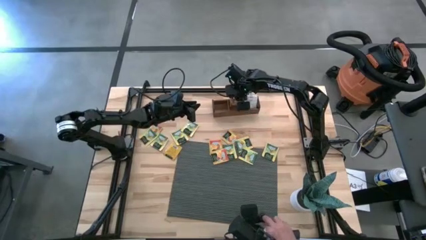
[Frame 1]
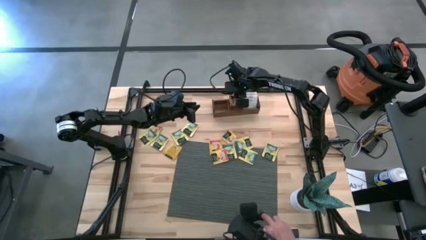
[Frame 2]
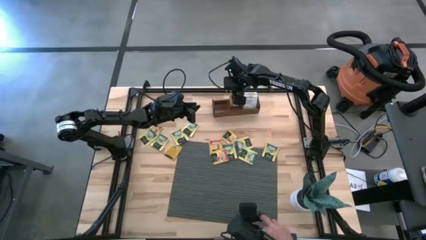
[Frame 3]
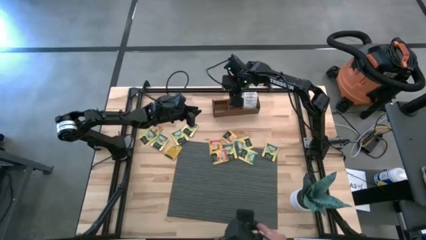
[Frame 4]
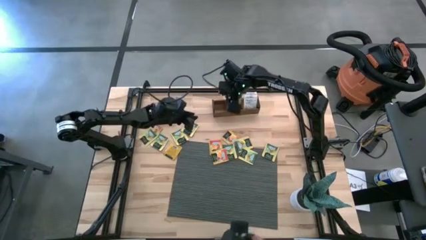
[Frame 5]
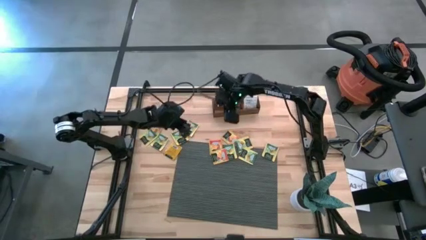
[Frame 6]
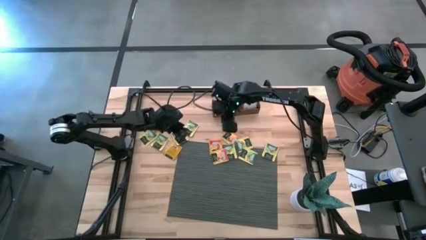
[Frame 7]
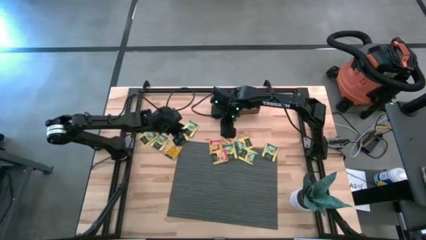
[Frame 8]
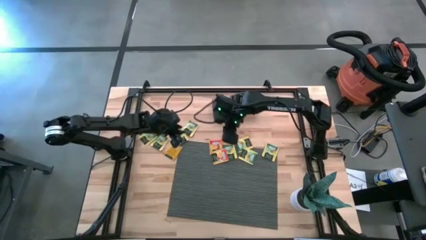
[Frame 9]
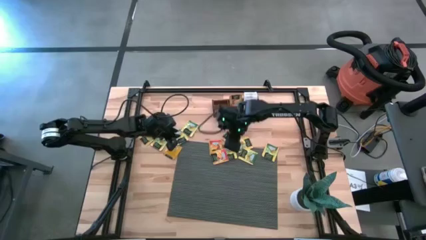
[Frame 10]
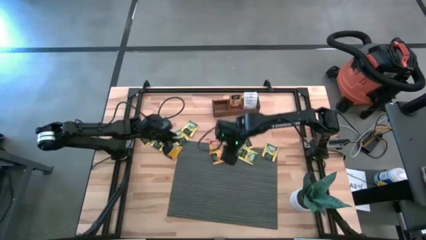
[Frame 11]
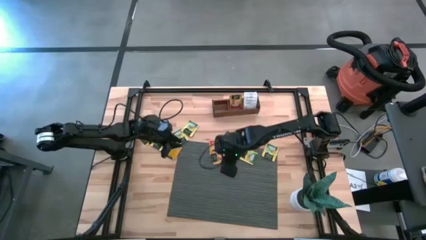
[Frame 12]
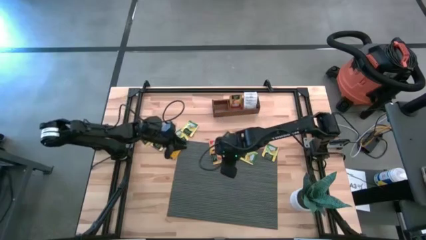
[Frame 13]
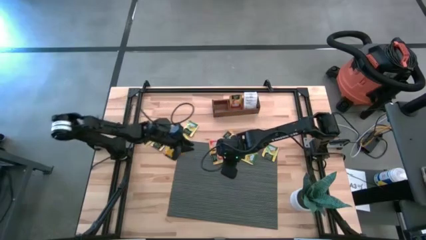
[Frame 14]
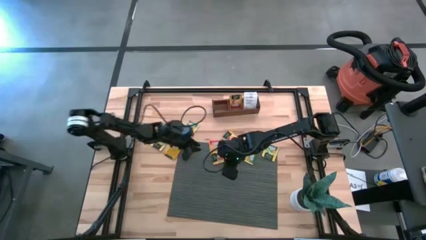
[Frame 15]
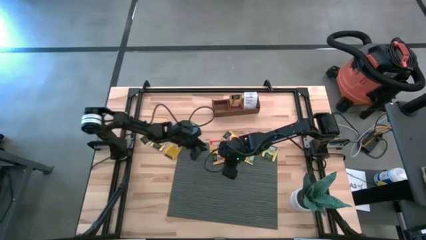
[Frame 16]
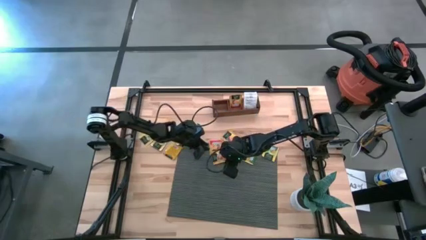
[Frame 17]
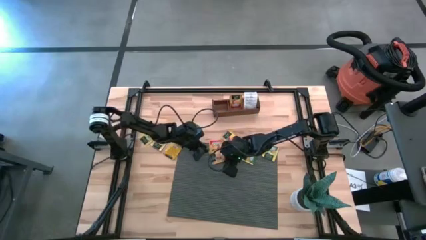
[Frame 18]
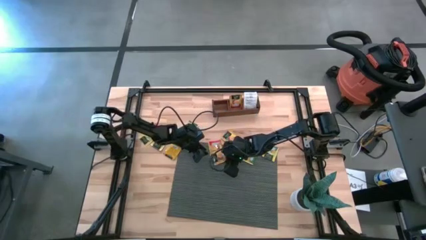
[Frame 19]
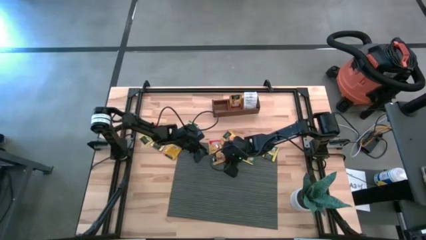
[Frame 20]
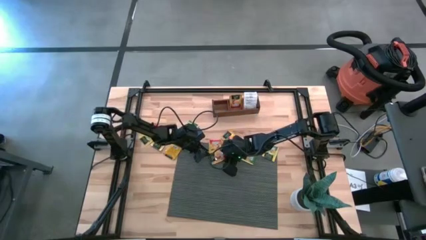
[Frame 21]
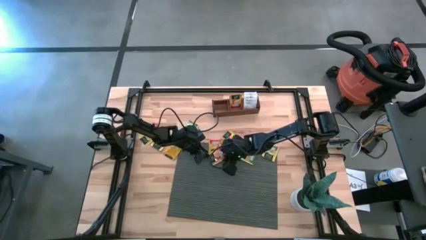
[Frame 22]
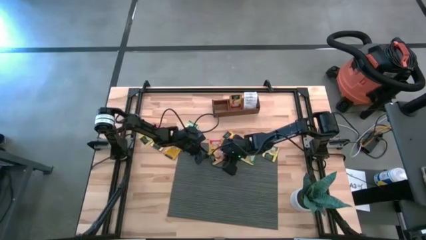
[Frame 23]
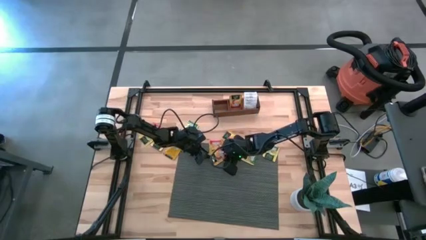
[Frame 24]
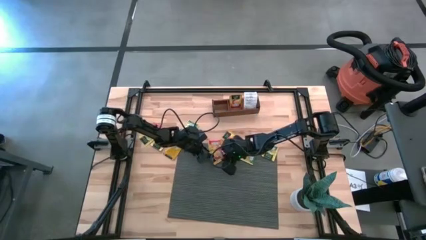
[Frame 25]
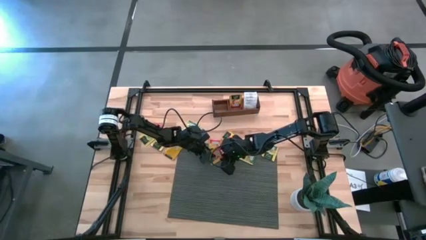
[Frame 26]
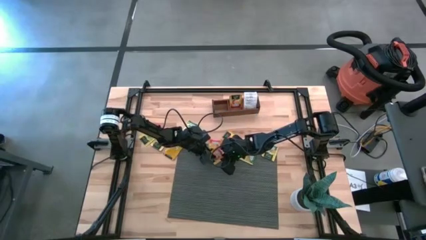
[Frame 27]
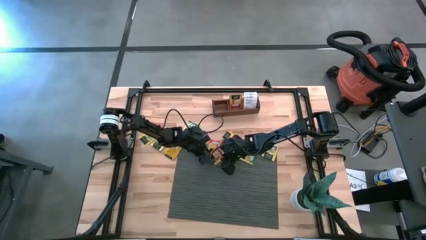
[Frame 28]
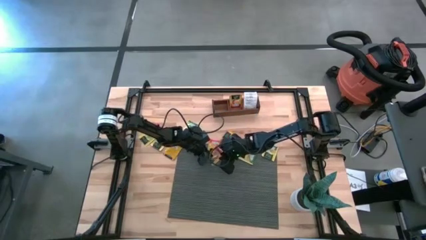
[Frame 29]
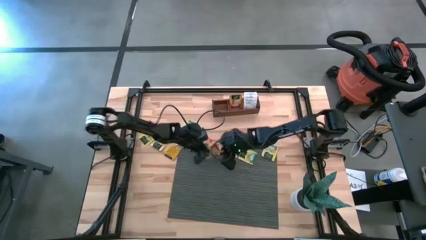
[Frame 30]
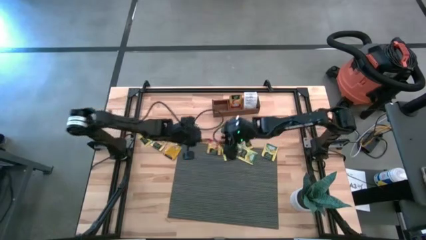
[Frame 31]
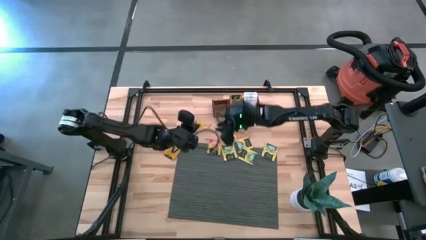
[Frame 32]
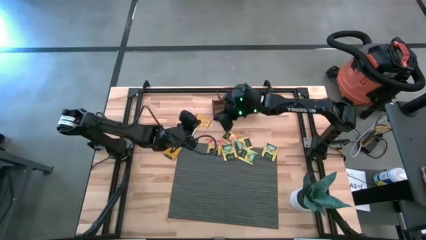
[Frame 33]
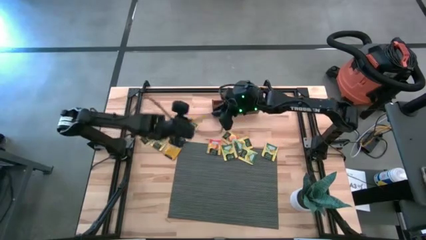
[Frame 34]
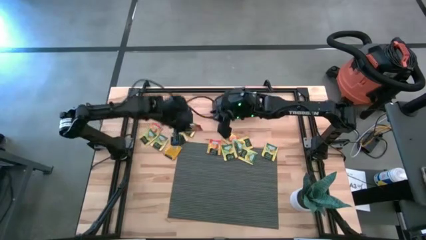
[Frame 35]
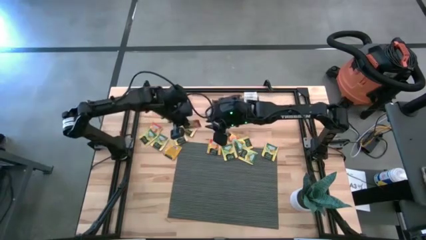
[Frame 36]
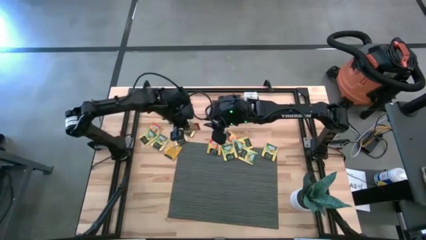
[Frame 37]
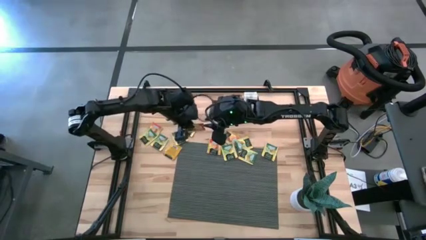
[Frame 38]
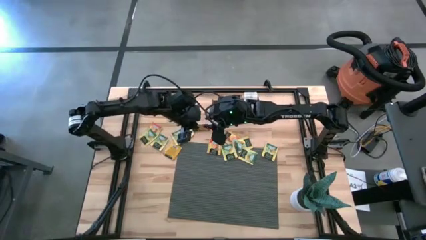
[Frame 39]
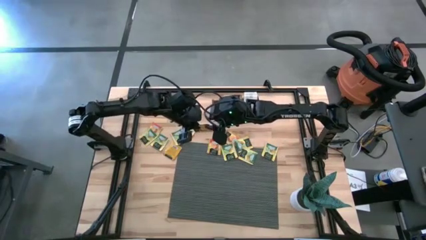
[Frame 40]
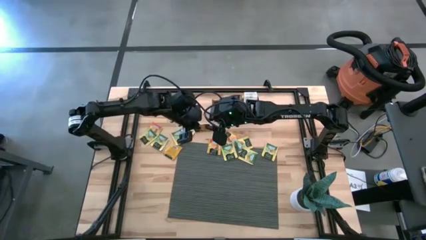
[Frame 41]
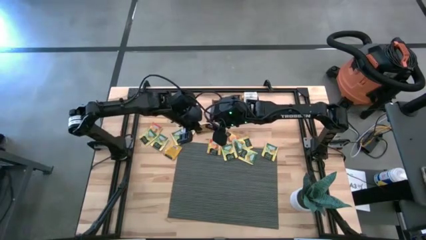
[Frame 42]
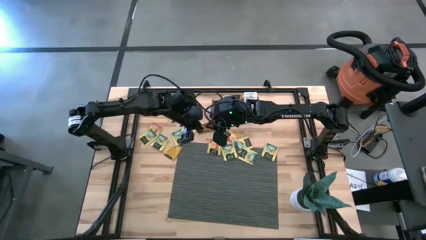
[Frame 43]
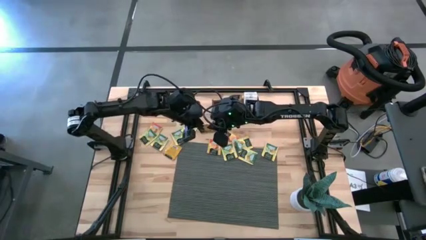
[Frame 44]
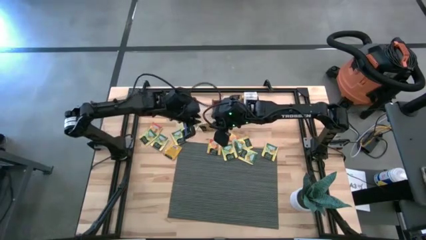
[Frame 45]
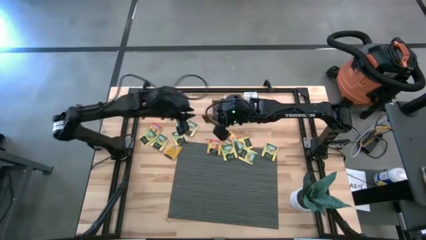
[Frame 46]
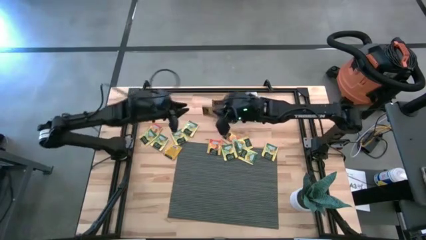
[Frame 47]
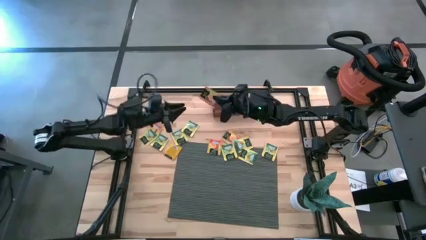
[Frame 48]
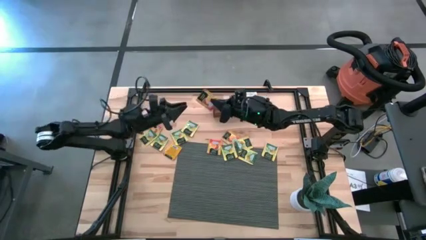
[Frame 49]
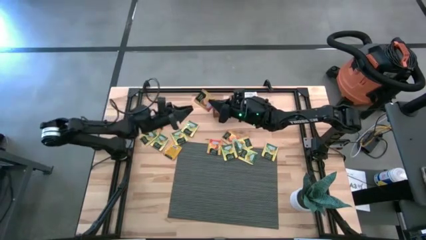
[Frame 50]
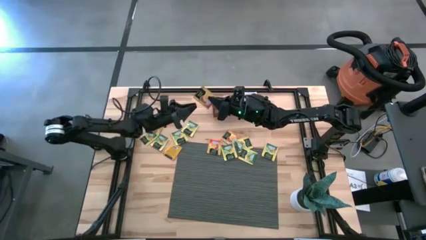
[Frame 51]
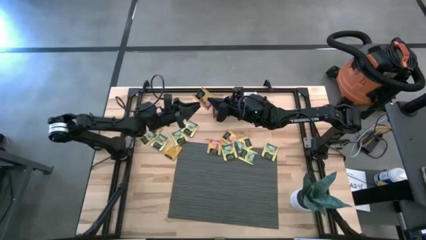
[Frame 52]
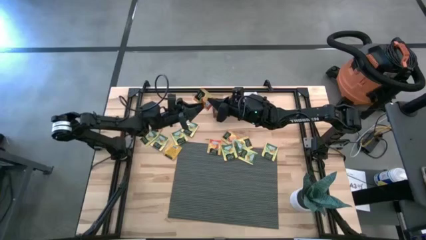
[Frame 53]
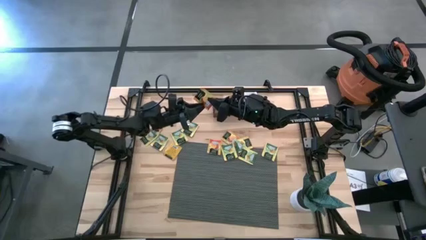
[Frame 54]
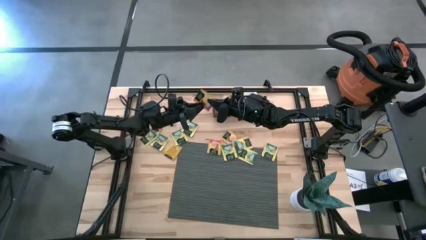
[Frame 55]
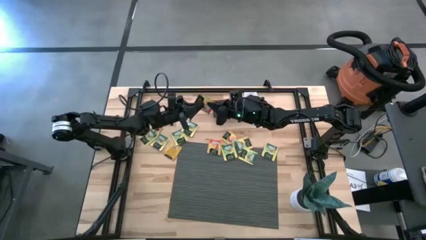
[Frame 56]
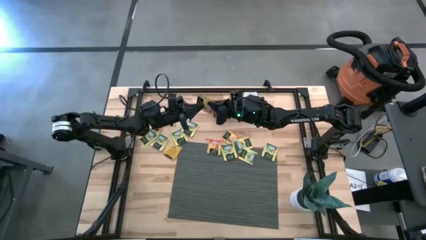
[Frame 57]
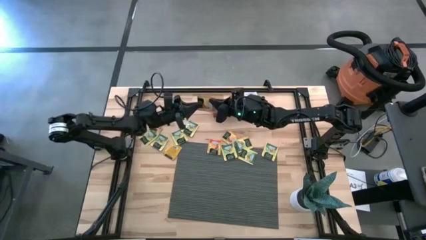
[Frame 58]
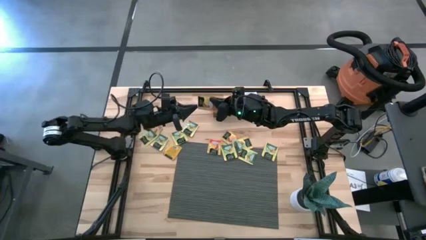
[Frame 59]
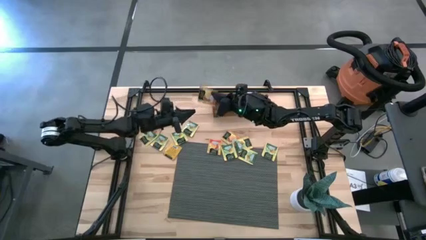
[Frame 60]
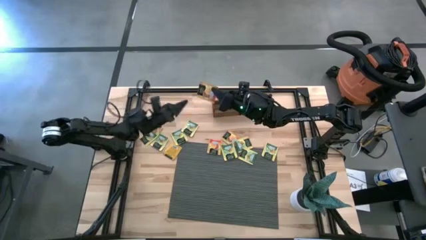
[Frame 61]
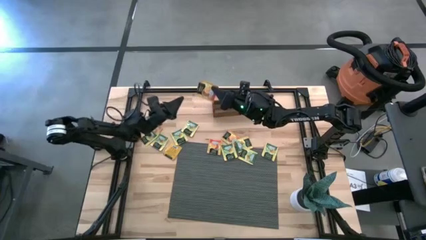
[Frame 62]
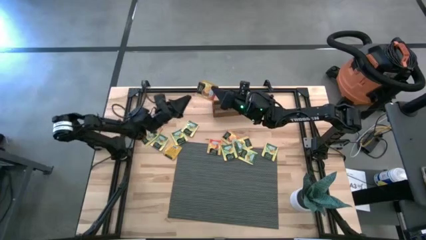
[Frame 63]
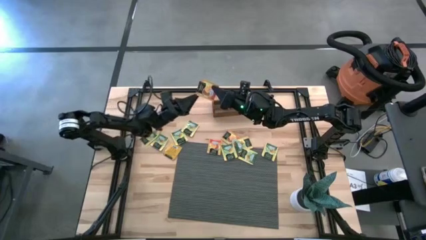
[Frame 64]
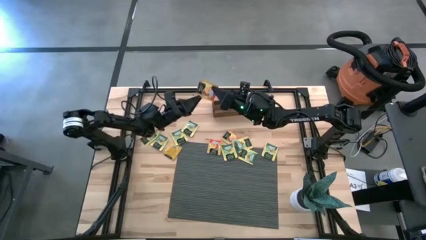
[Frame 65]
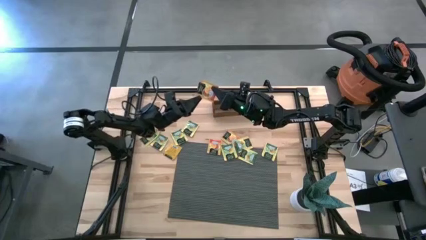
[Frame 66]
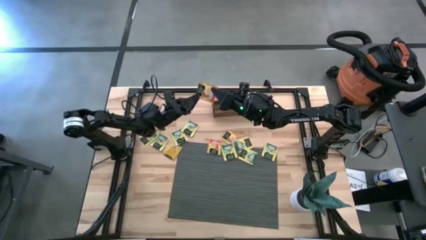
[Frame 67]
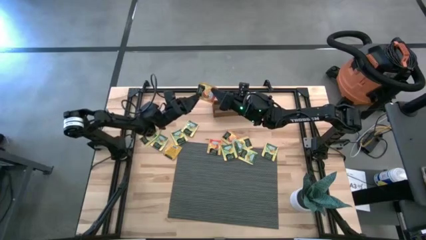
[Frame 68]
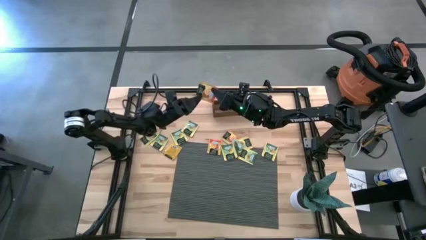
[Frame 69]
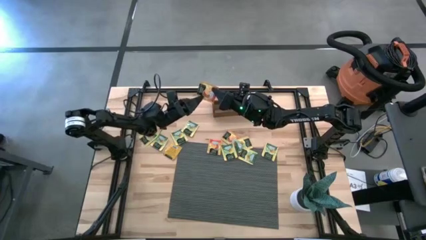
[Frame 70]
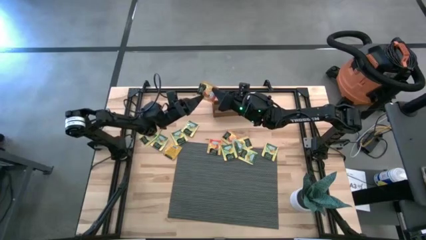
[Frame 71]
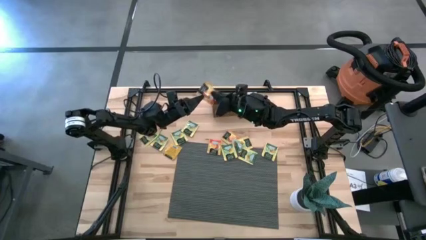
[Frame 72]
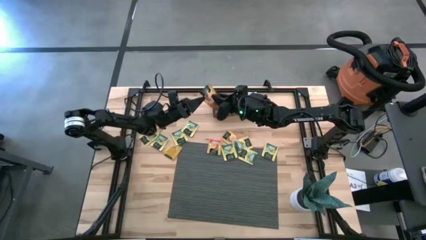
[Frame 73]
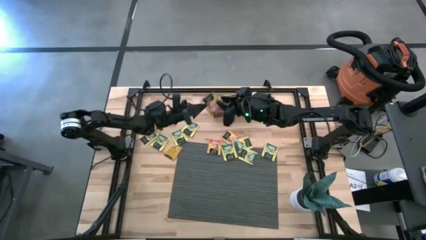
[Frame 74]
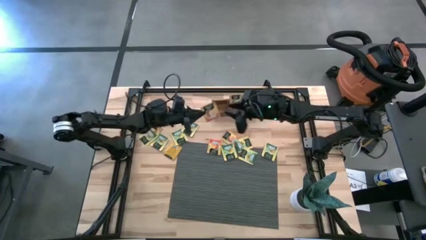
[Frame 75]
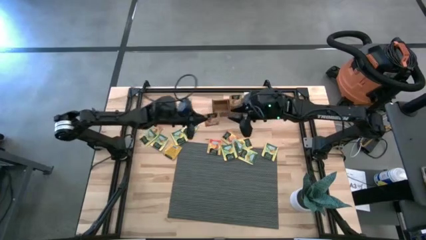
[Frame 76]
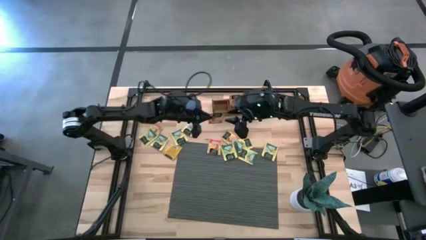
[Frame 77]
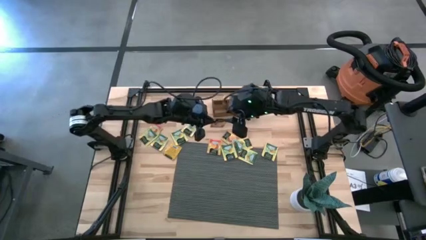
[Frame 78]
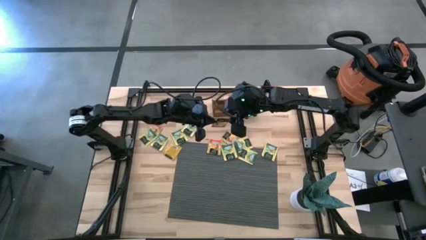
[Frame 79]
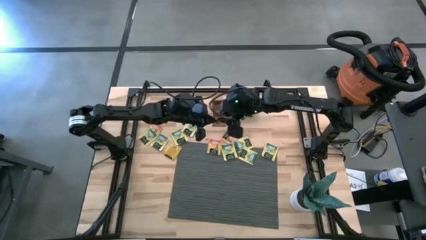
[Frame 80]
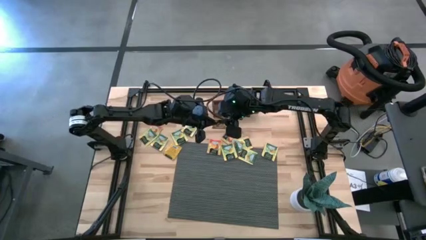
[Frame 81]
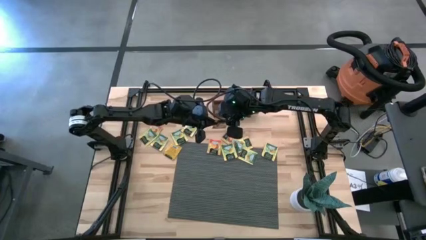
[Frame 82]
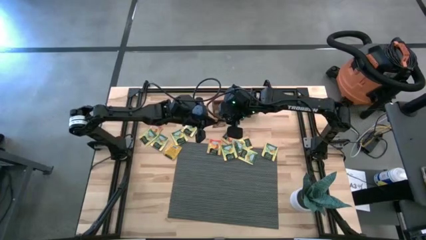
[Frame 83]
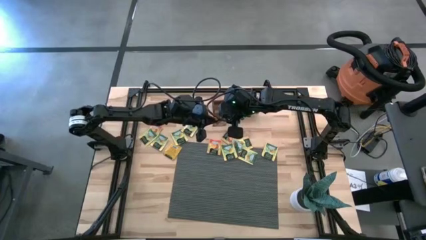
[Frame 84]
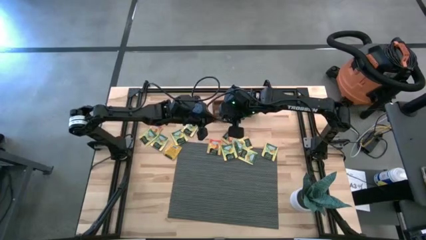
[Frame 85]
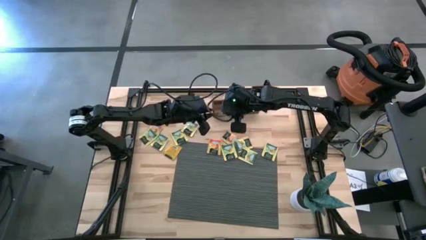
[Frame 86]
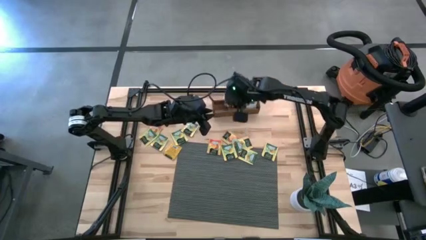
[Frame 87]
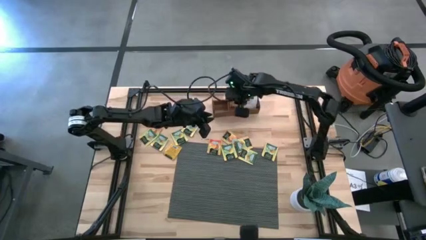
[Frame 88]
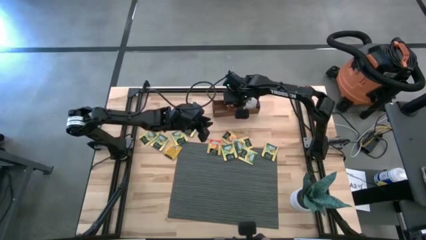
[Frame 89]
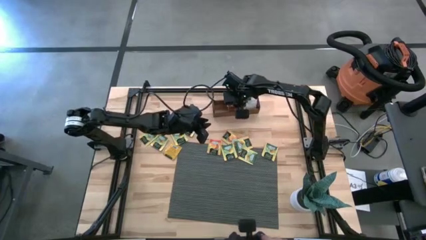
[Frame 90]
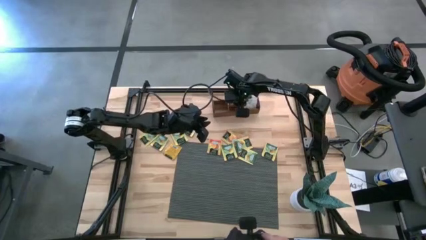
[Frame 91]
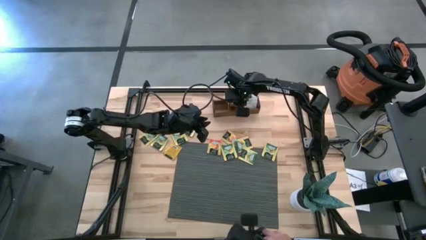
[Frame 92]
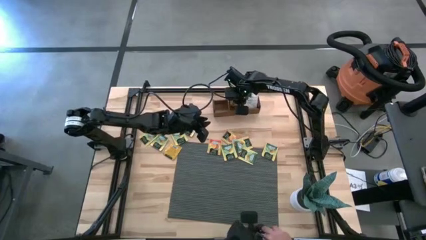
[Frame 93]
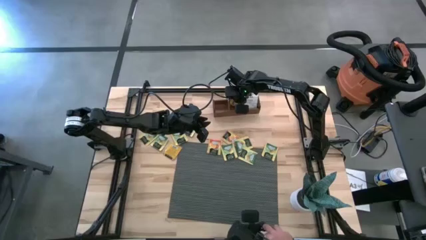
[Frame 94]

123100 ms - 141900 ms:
Task: Pick & Place Tea
Put the orange tea bag into the middle section of the wooden organizer
